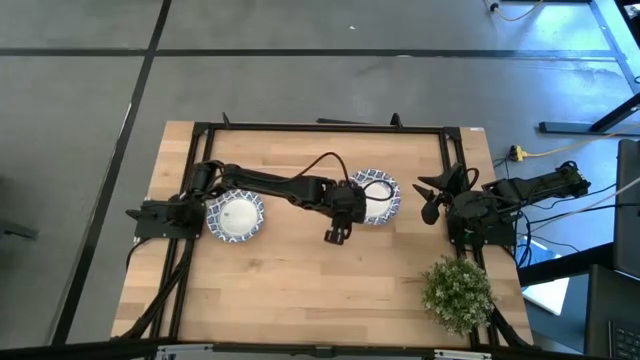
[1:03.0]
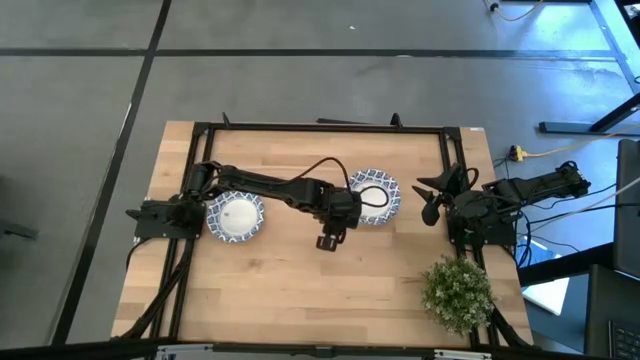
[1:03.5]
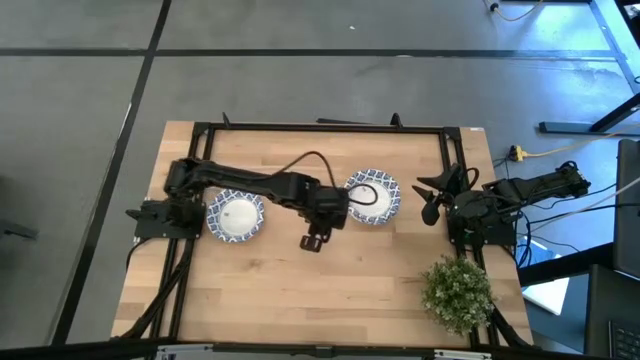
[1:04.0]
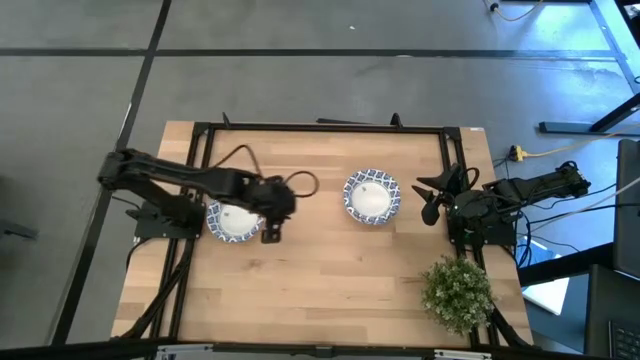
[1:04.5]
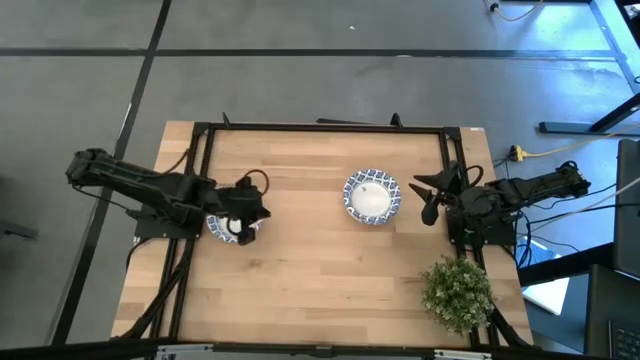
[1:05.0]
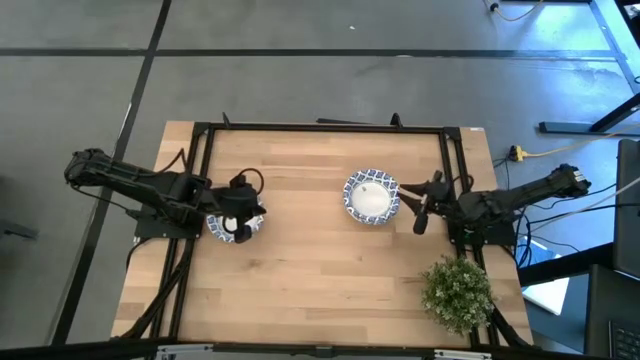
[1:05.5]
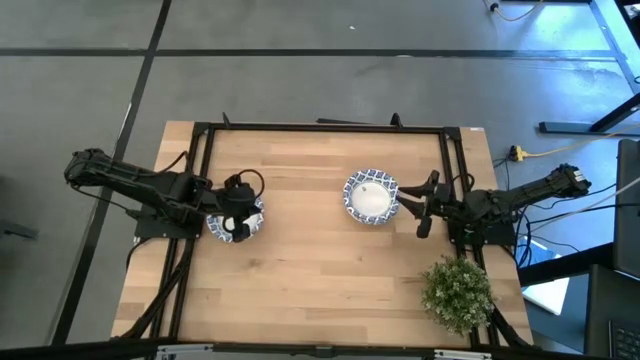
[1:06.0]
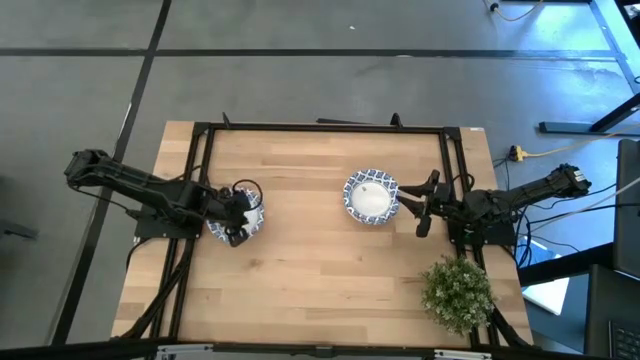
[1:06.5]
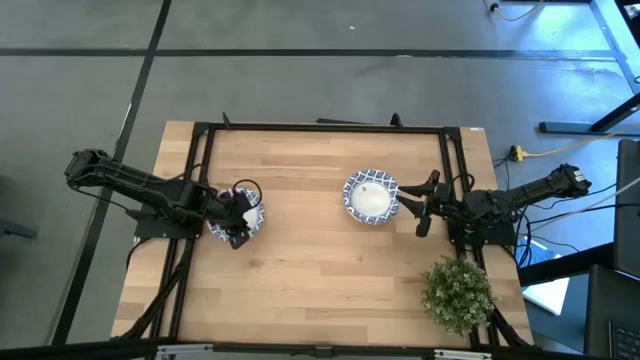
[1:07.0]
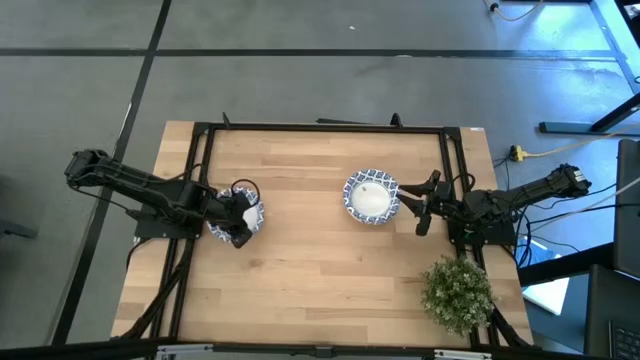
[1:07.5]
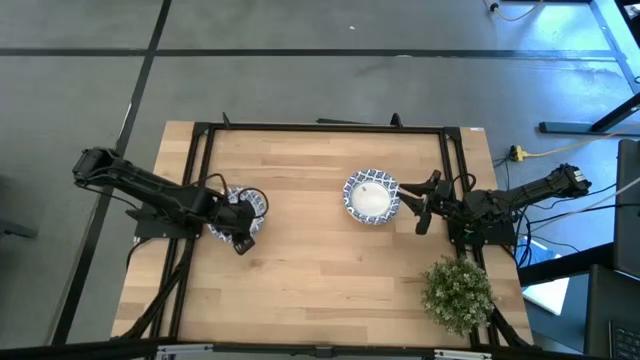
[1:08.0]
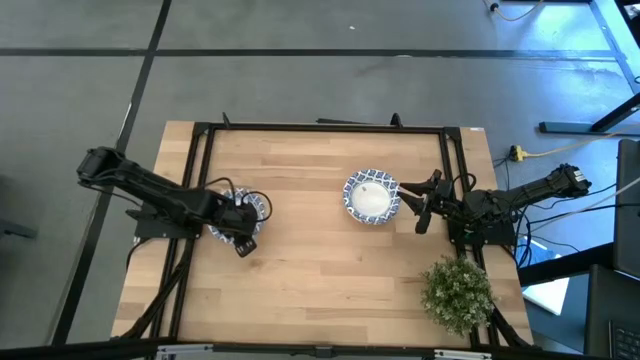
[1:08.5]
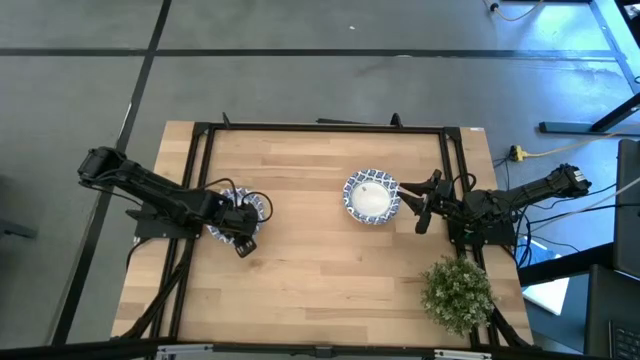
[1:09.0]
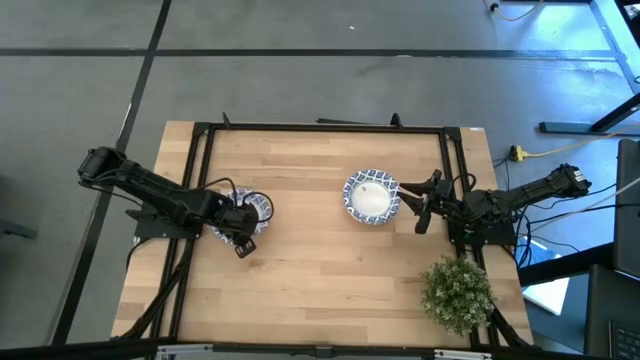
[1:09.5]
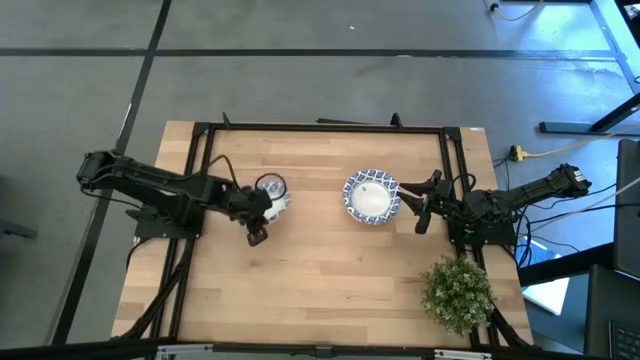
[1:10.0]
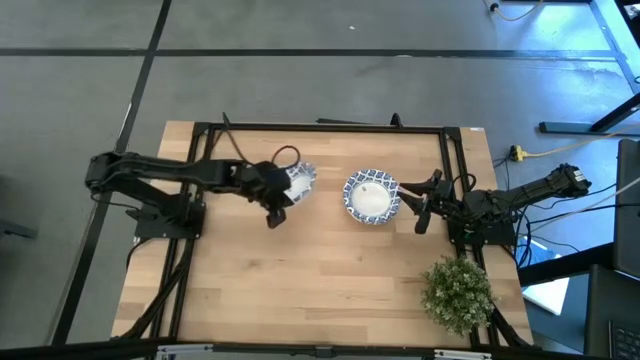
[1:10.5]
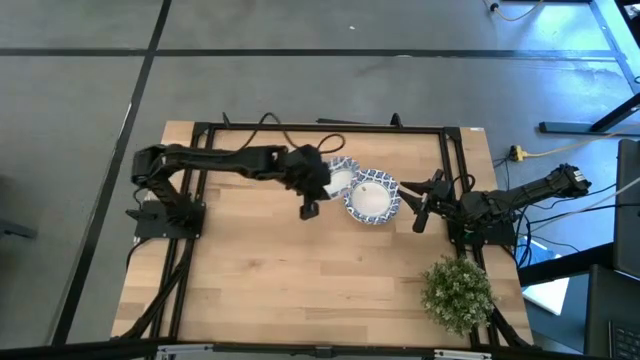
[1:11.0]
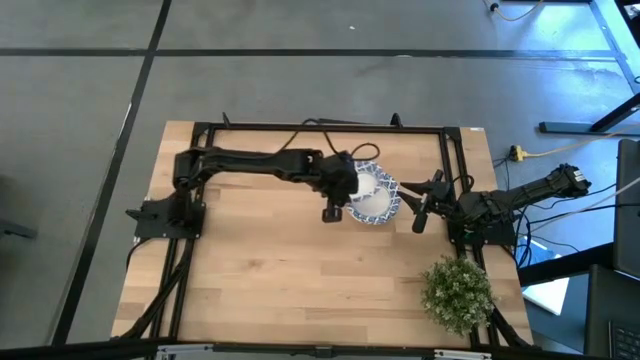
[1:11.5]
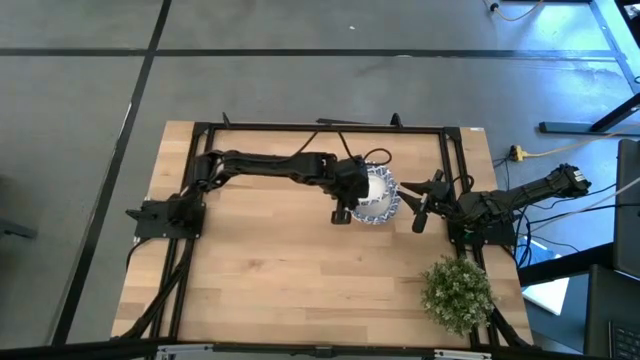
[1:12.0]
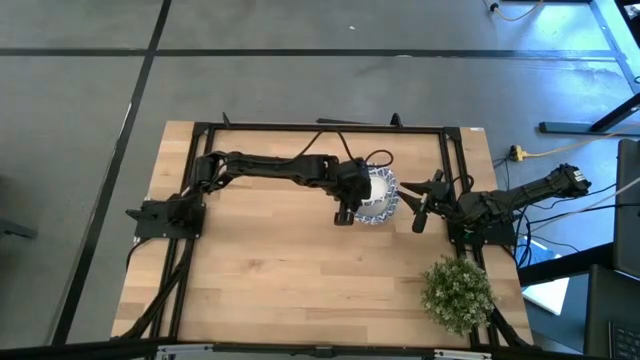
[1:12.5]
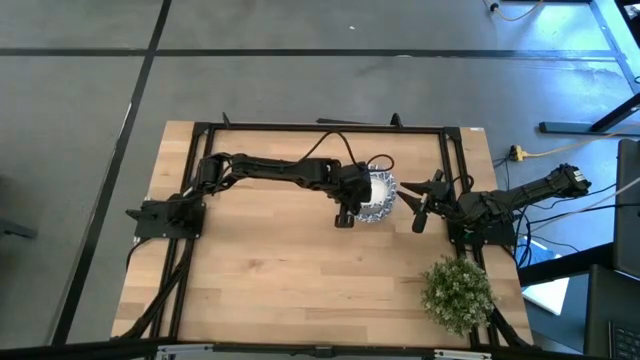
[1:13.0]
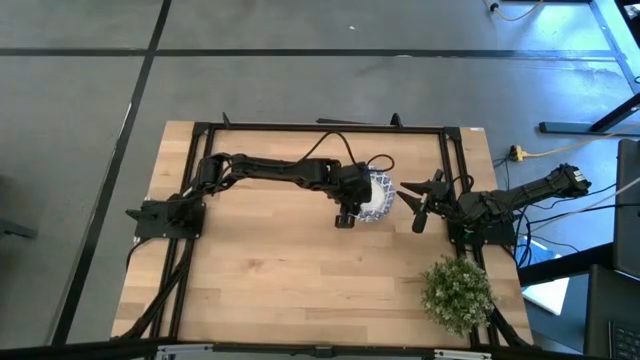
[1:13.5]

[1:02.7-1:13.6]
Task: Nest bowls inside each other
Stack the blue bowl on the blue bowls

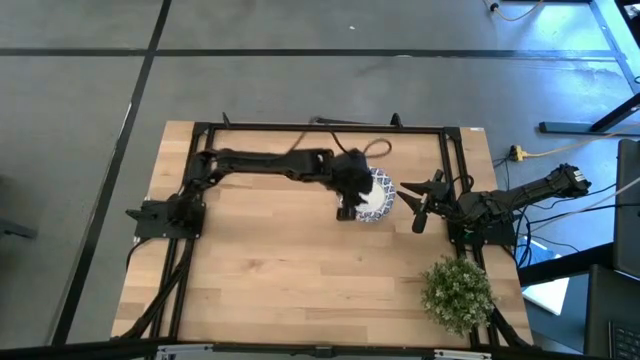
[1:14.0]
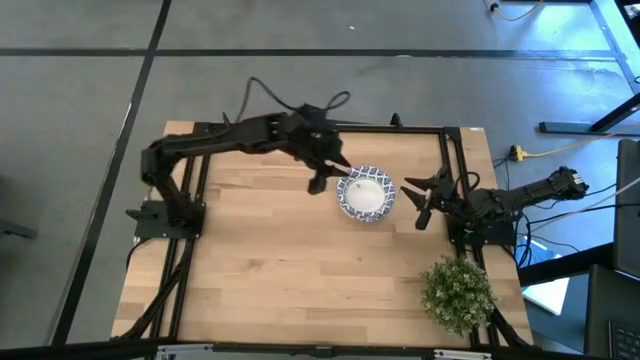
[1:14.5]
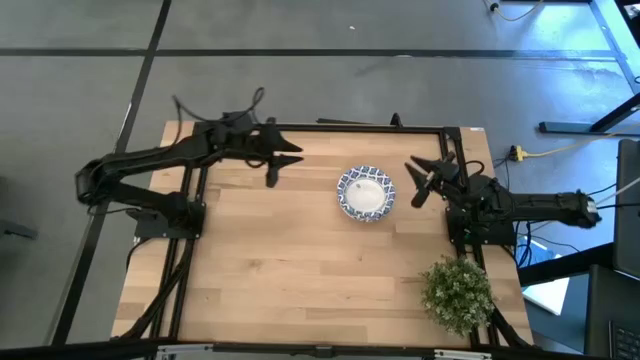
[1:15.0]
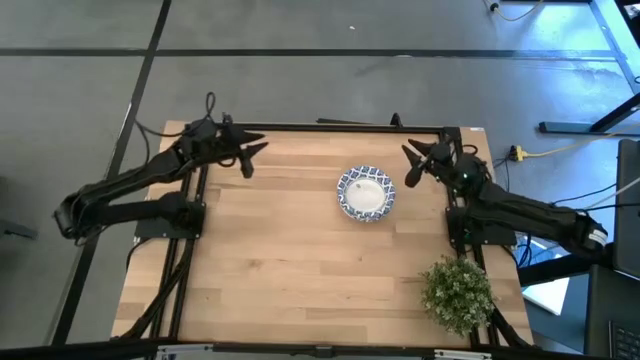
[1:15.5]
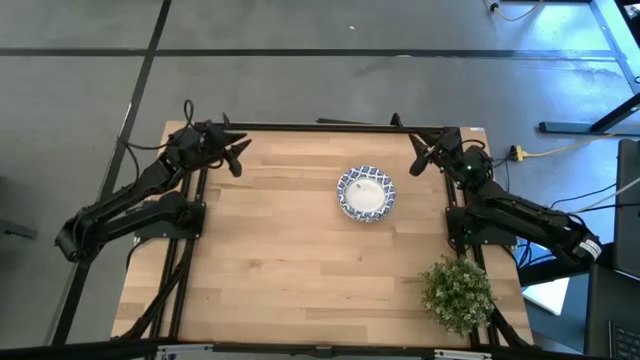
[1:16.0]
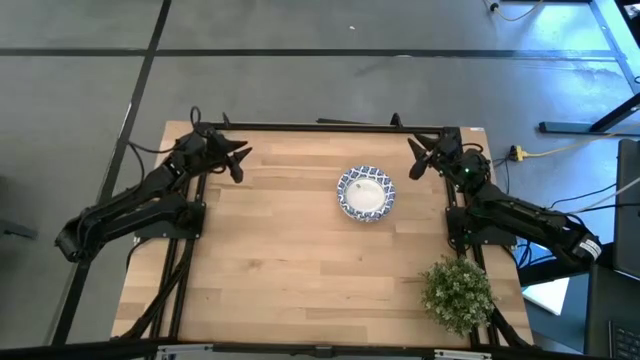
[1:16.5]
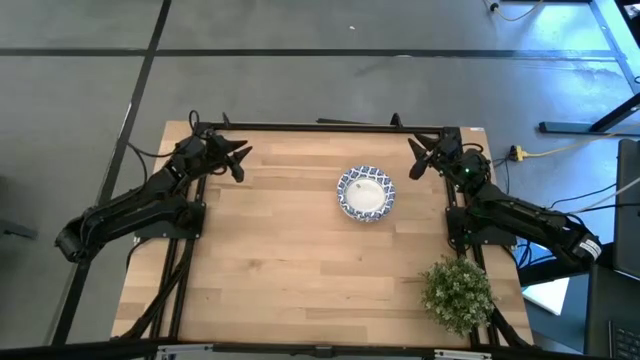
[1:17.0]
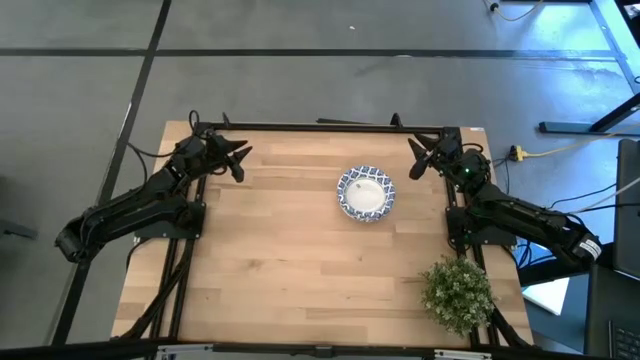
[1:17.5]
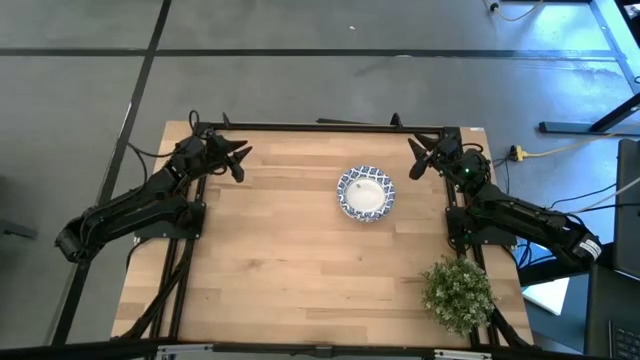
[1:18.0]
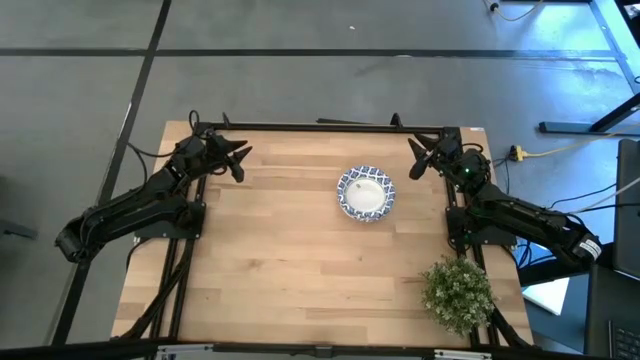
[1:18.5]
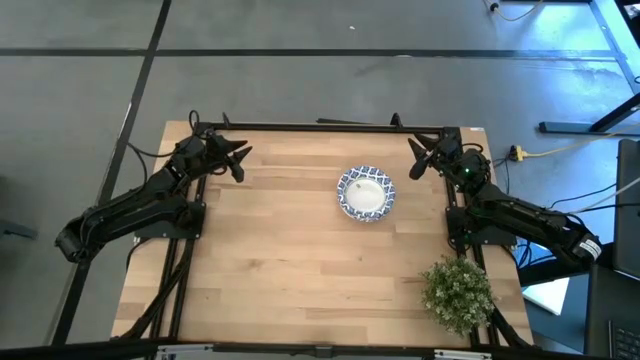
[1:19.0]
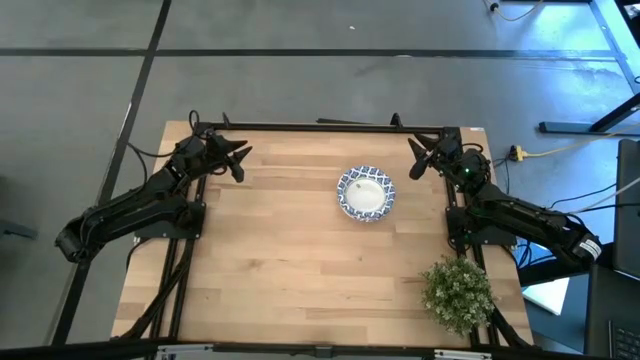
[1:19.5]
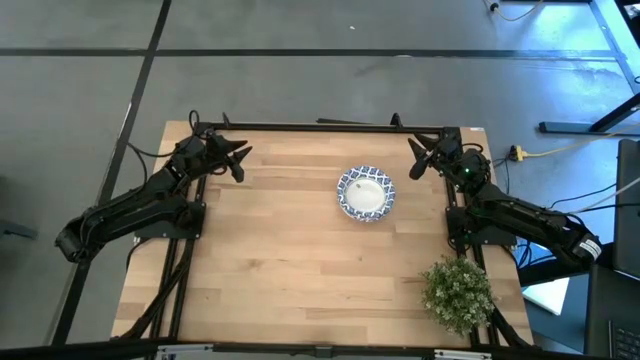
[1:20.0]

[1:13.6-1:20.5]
Return to Home Position

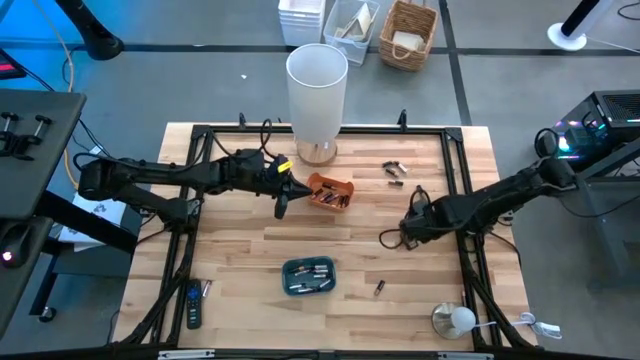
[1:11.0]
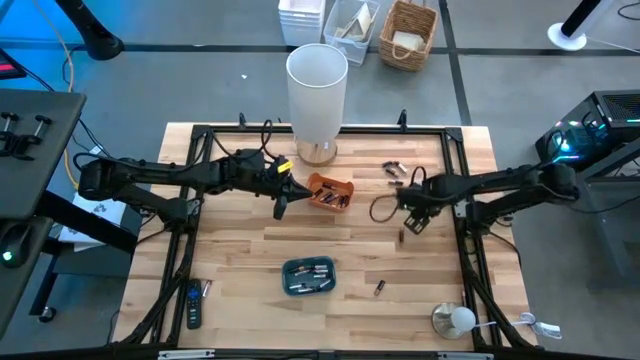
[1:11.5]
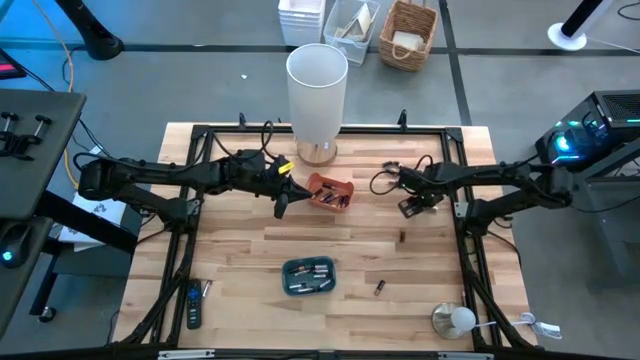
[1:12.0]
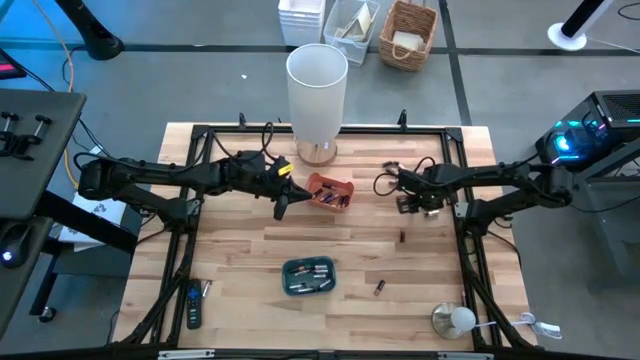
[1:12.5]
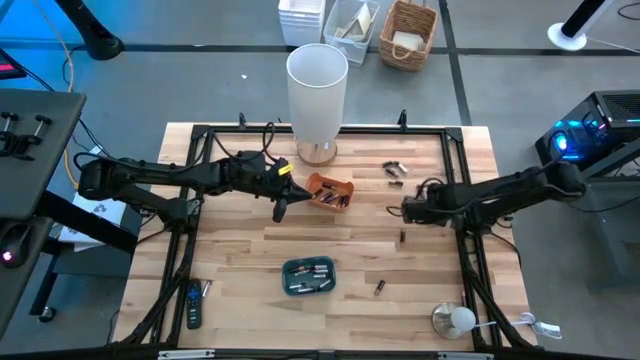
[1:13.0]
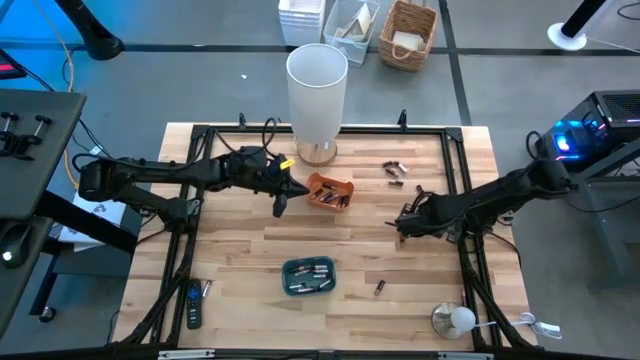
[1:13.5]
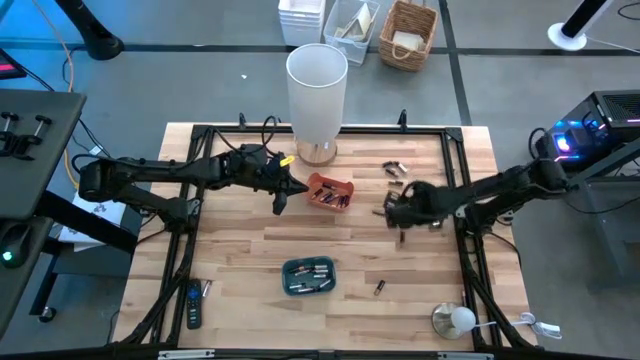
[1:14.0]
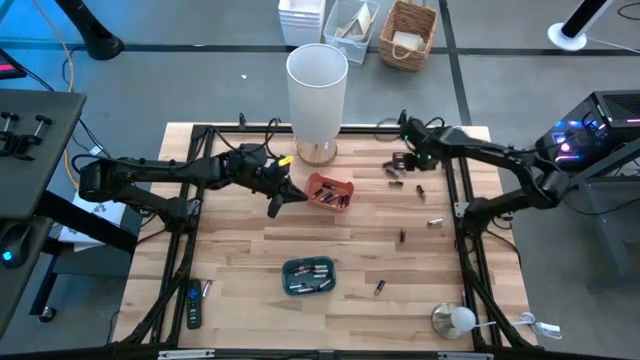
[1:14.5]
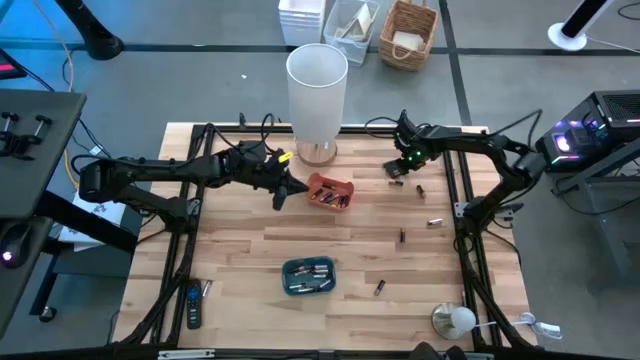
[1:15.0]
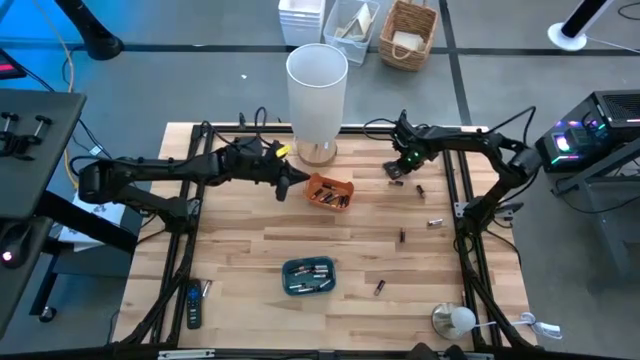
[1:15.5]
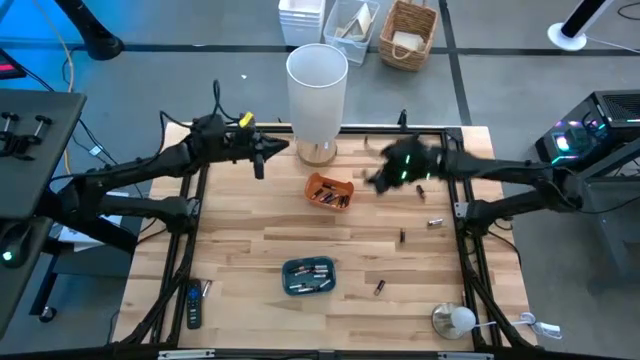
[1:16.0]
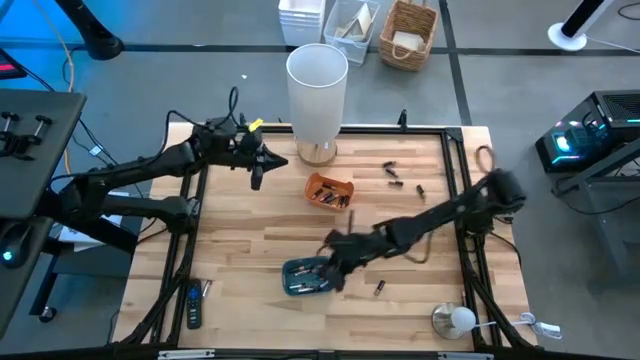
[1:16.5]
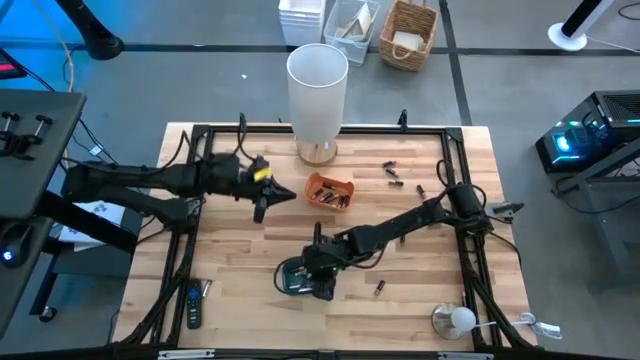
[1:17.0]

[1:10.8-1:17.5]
Task: Sort batteries
Put the silver battery into the blue bin
